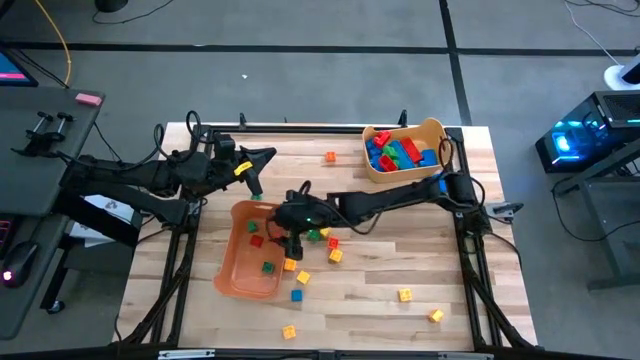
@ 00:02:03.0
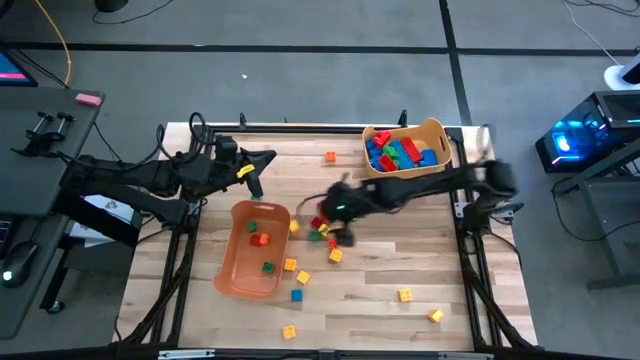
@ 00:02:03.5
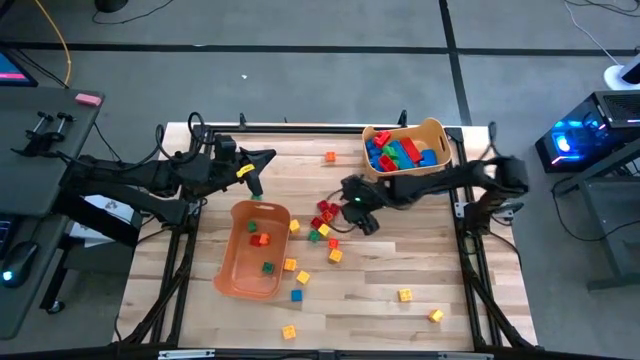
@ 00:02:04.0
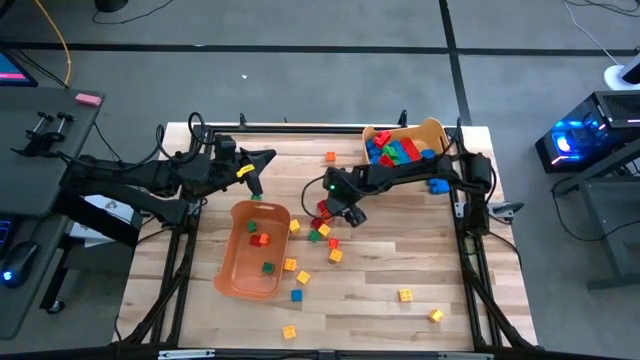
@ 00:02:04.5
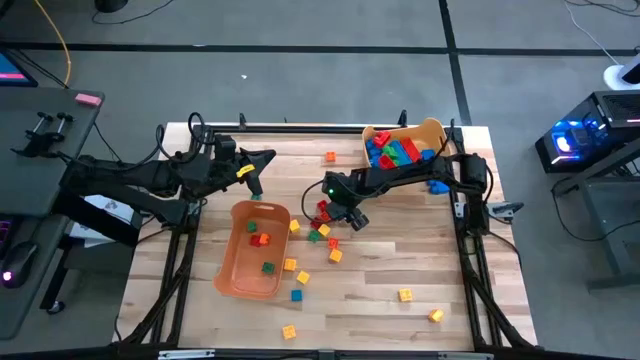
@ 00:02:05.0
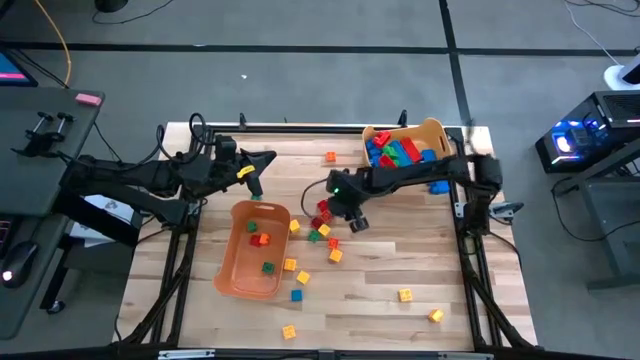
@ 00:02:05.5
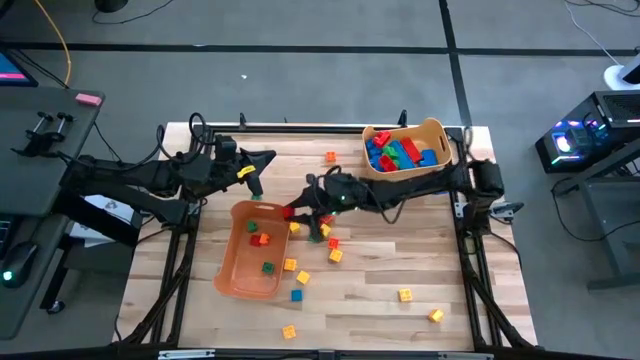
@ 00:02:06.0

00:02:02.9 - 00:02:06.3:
Task: Sort blocks by size
Put the red game piece into the orange bin

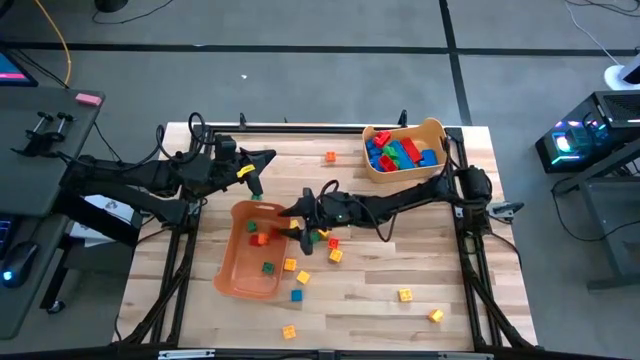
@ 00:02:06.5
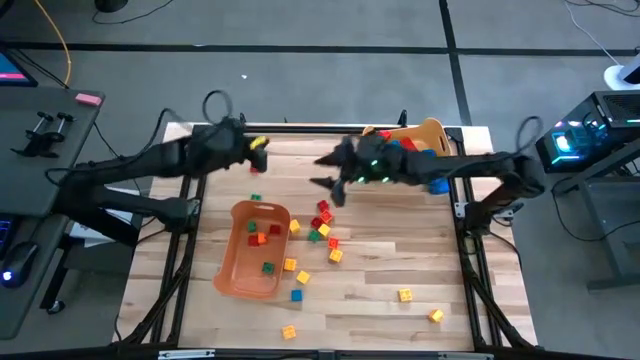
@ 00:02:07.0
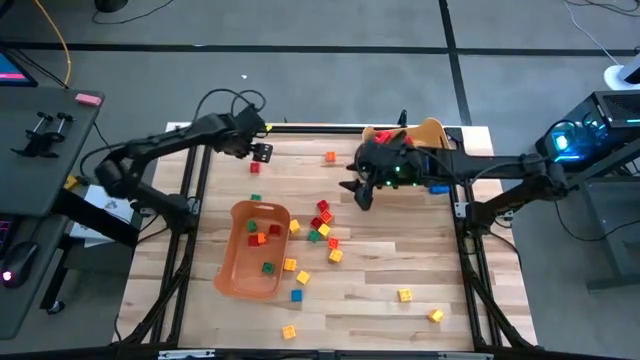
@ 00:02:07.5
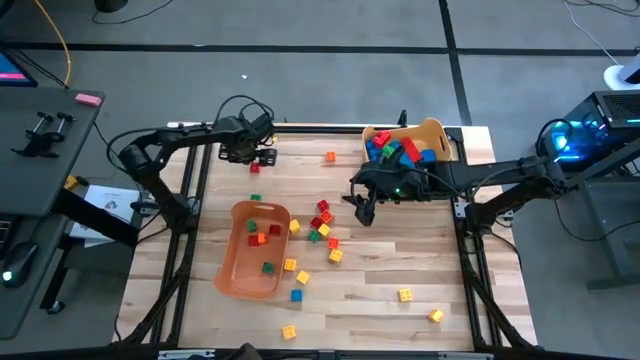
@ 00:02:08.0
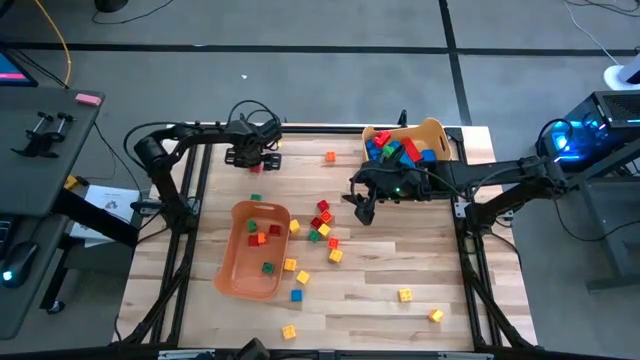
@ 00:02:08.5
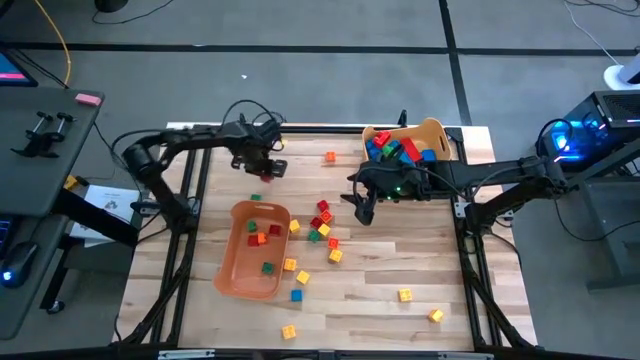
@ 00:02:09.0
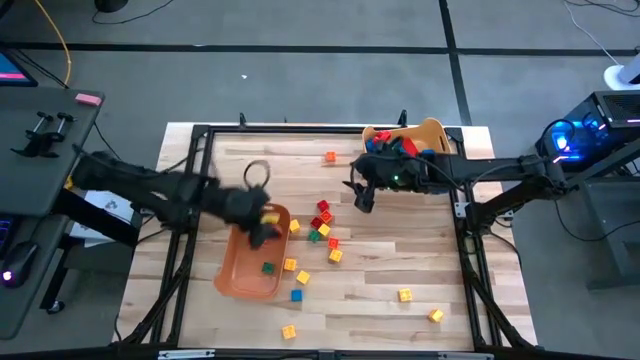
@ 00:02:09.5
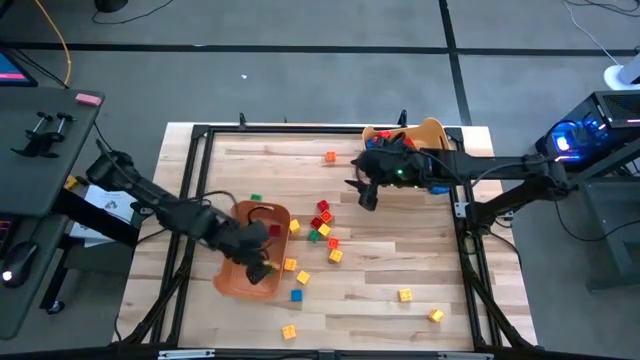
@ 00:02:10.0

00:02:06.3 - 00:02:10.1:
Put the red game piece into the orange bin

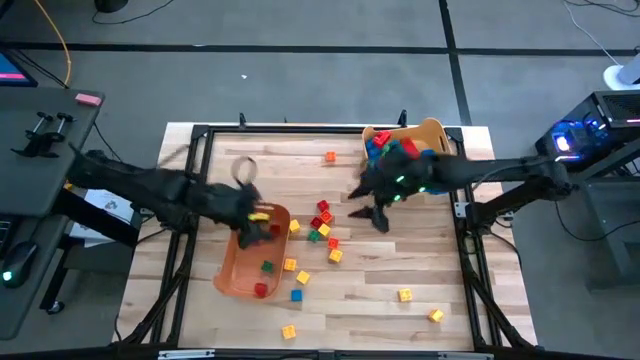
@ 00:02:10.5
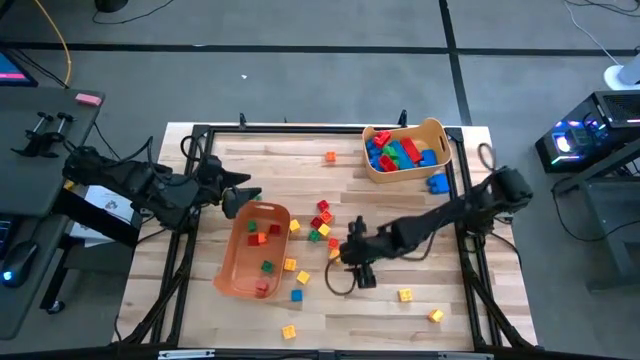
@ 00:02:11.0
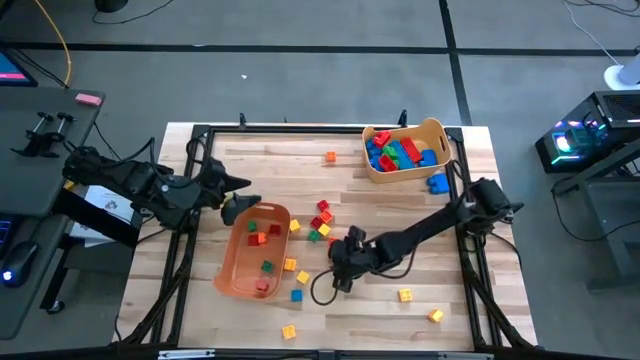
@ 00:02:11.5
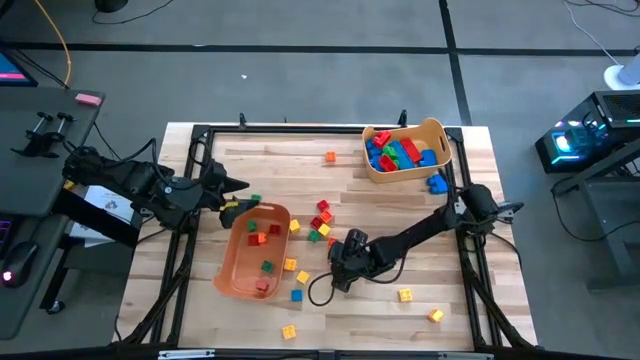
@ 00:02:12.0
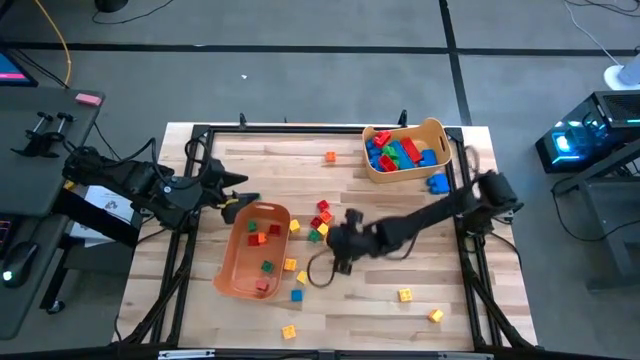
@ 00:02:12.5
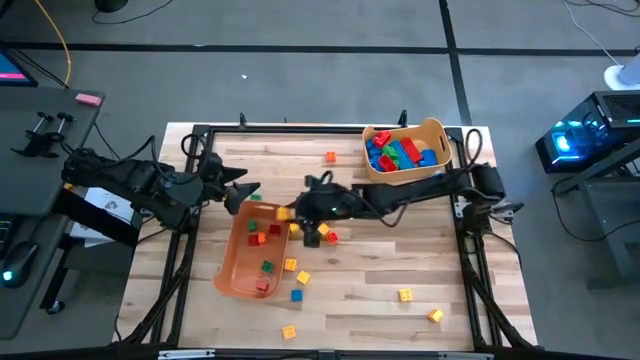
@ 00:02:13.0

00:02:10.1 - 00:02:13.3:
Put the yellow game piece into the orange bin

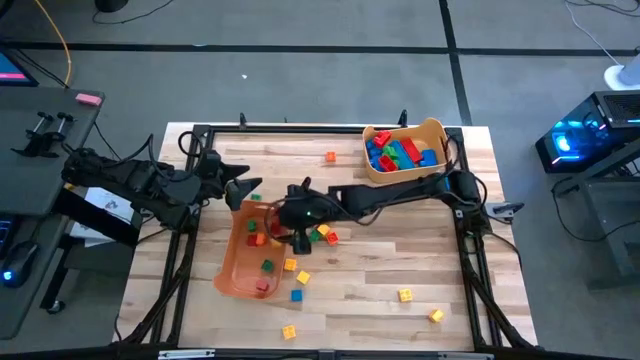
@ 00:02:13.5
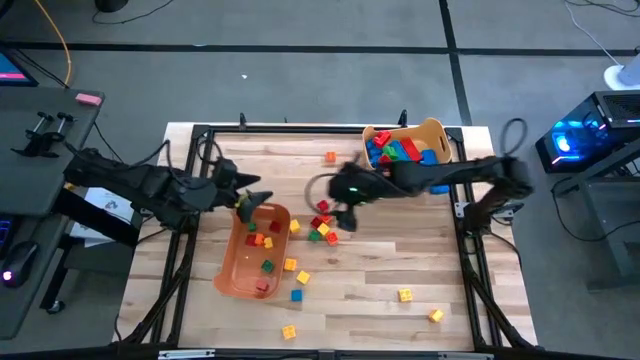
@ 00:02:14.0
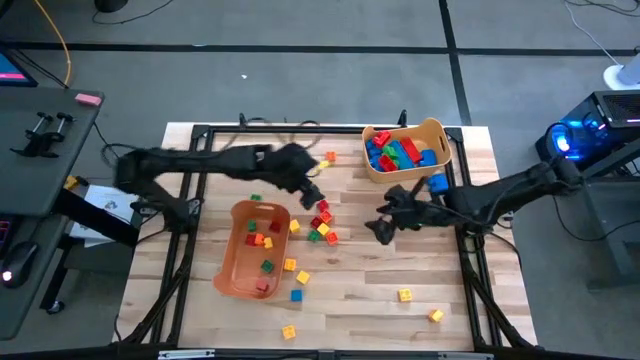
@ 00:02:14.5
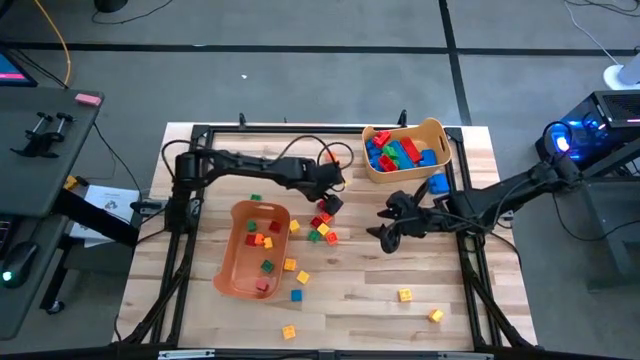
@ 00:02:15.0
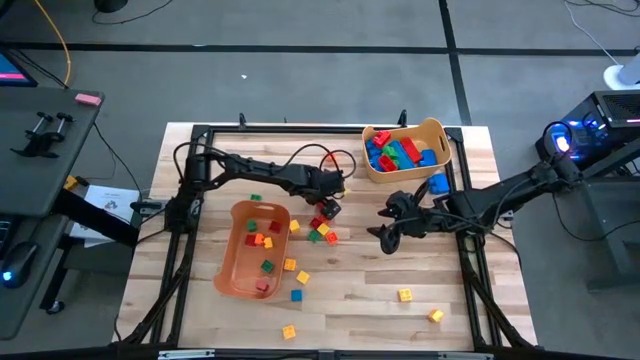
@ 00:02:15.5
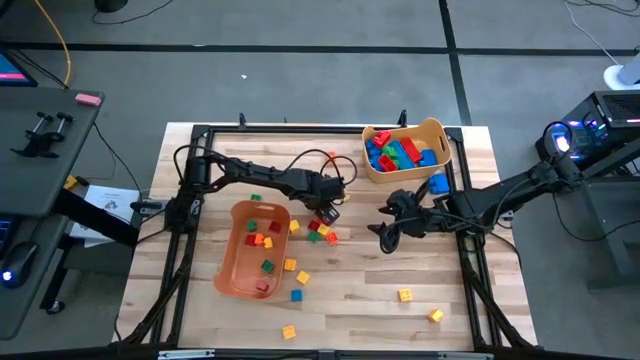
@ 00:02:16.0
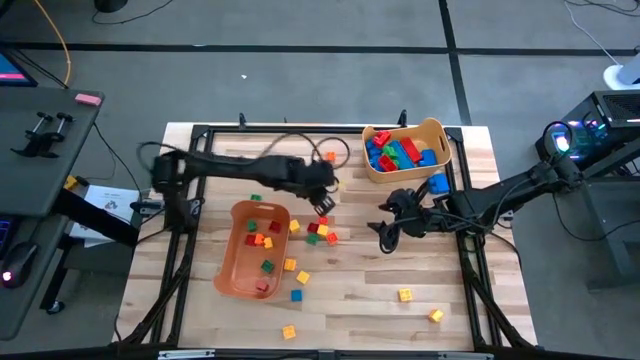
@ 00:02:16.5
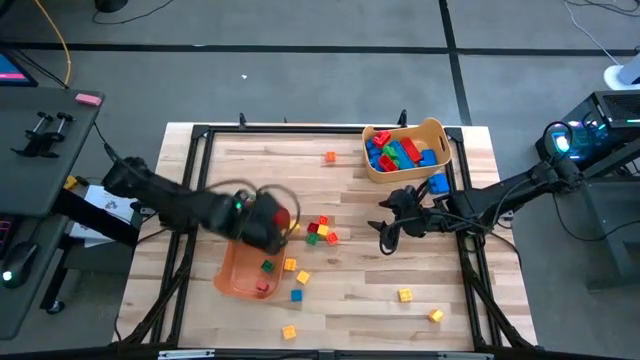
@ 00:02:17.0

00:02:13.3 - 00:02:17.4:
Put the red game piece into the orange bin

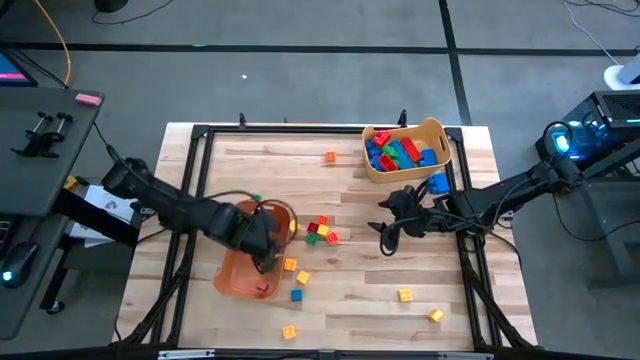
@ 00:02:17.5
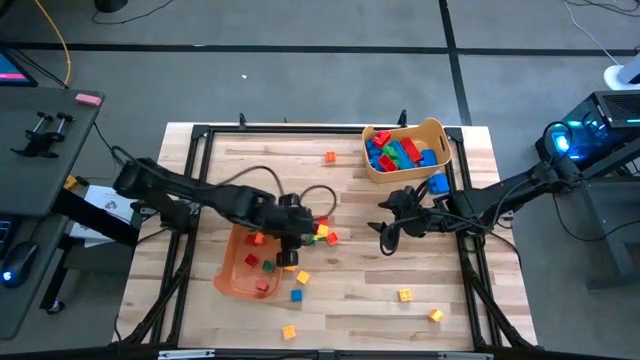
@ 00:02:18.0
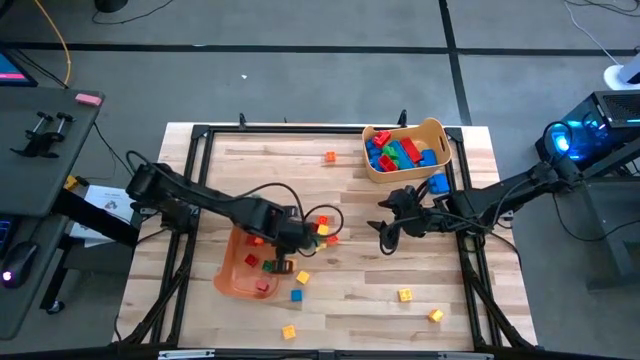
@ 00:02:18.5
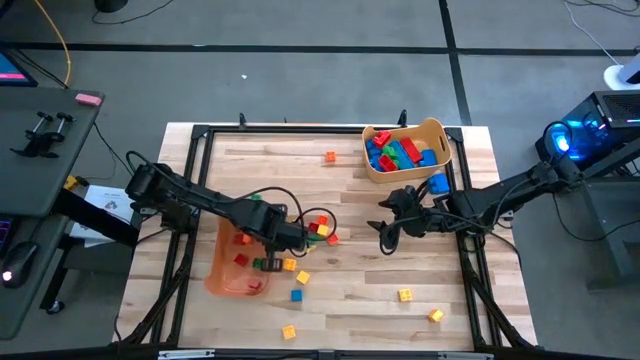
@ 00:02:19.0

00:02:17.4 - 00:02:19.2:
Adjust the orange bin

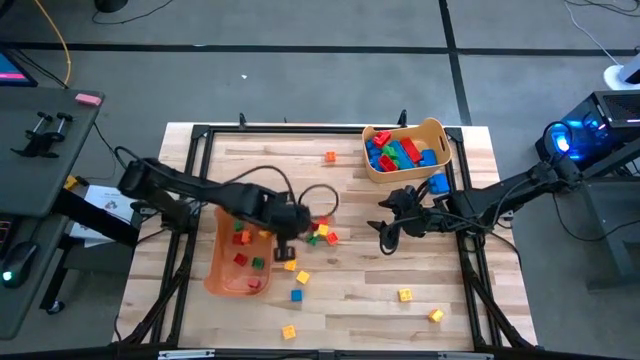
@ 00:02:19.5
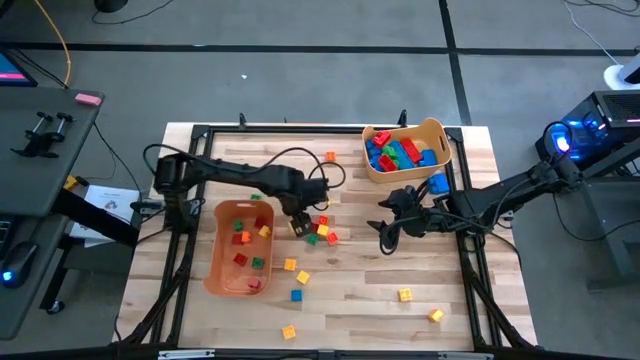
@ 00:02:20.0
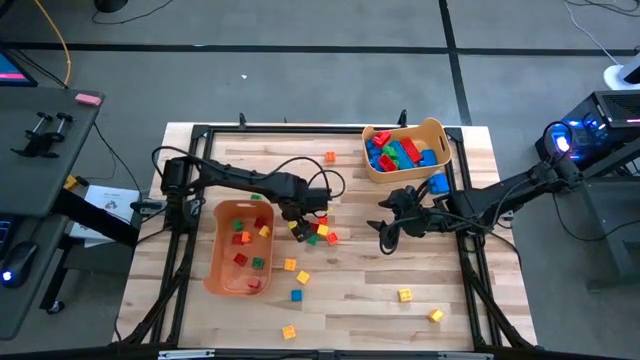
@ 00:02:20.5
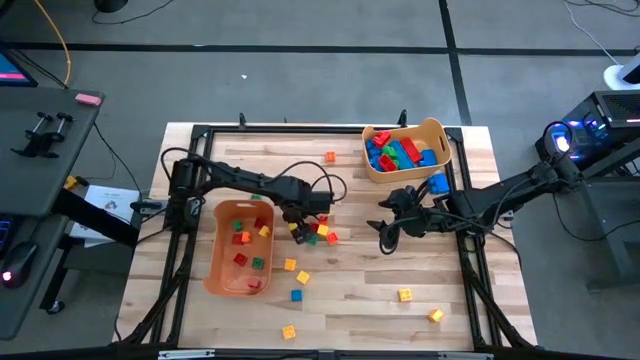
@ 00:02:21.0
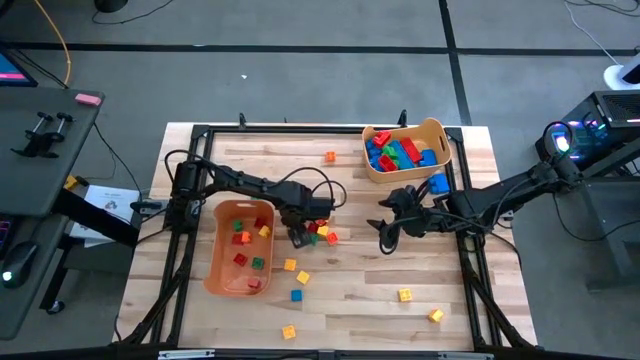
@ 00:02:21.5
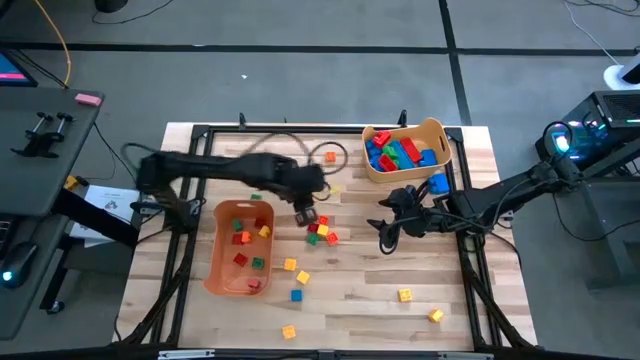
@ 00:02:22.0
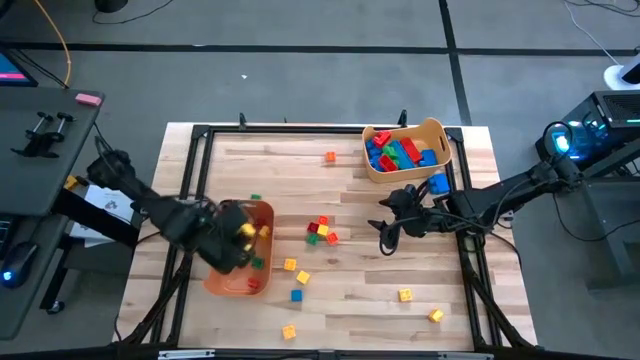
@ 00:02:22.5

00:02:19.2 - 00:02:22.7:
Put the yellow block into the orange bin

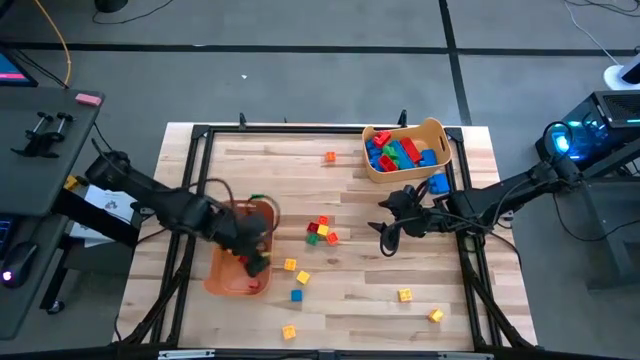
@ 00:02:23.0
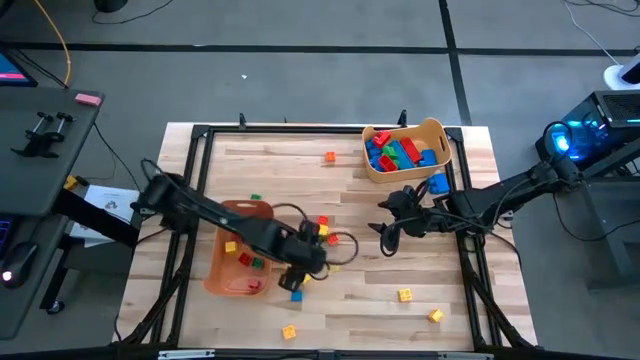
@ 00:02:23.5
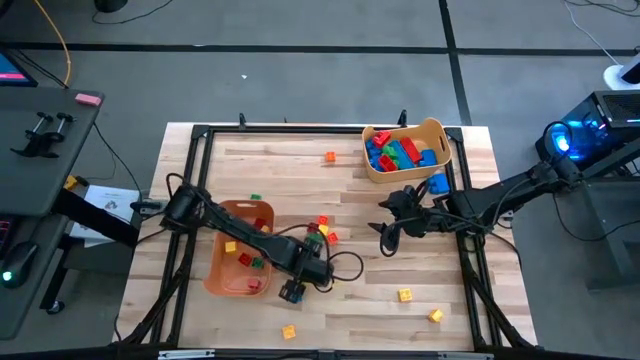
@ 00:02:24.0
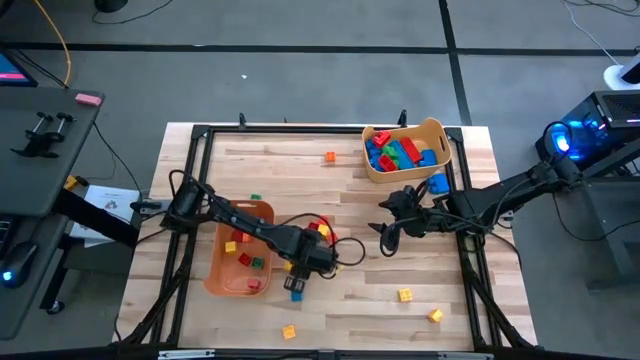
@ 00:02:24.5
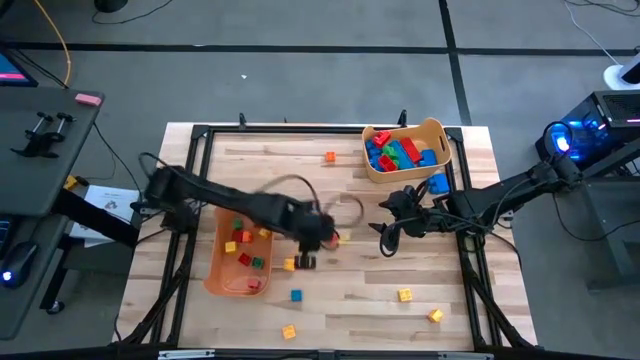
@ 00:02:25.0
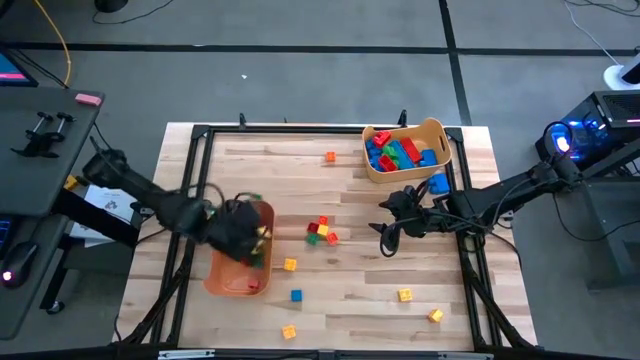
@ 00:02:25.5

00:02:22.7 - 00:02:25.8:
Put the yellow block into the orange bin
